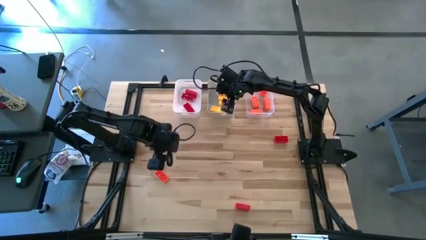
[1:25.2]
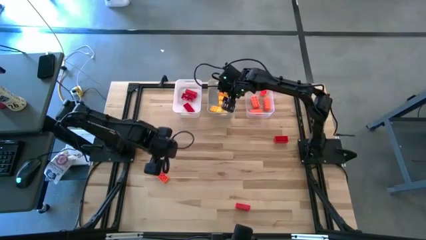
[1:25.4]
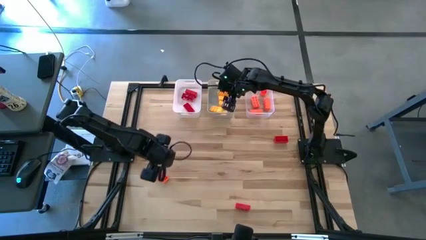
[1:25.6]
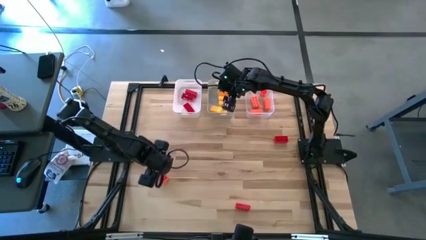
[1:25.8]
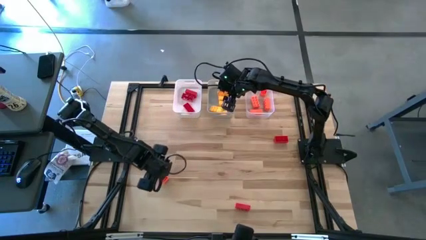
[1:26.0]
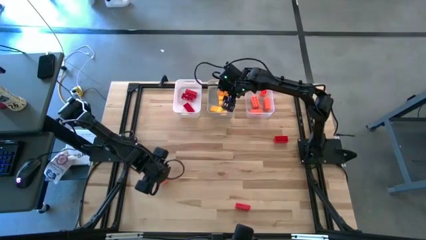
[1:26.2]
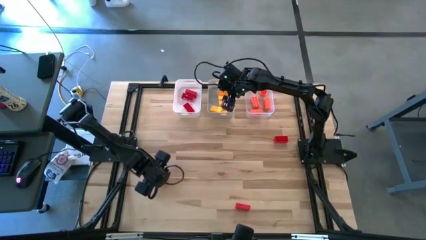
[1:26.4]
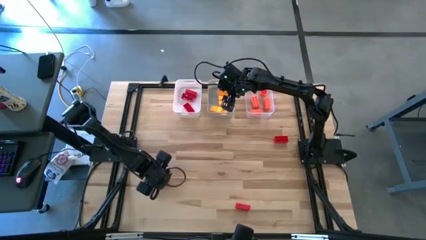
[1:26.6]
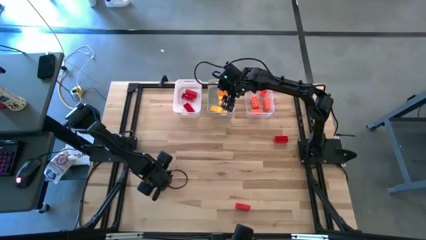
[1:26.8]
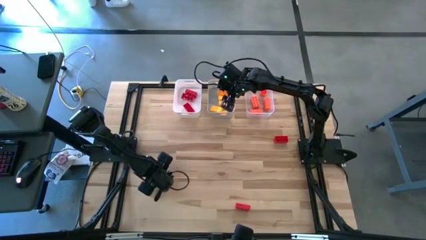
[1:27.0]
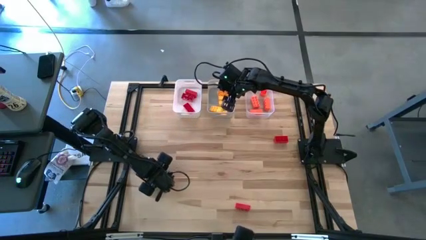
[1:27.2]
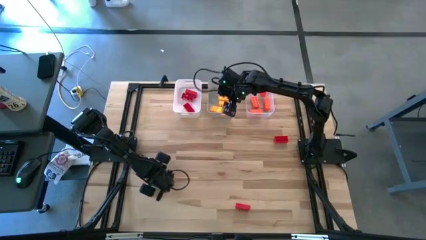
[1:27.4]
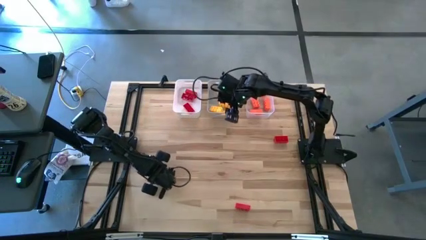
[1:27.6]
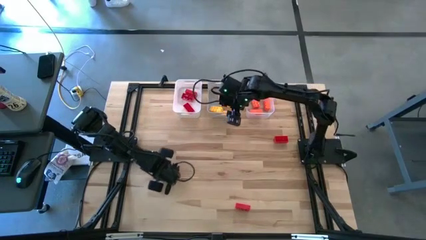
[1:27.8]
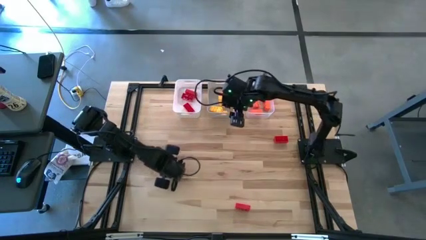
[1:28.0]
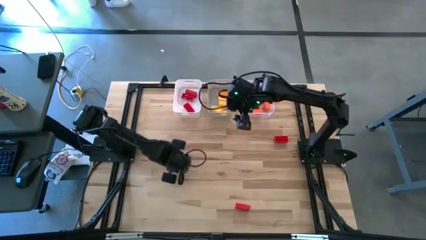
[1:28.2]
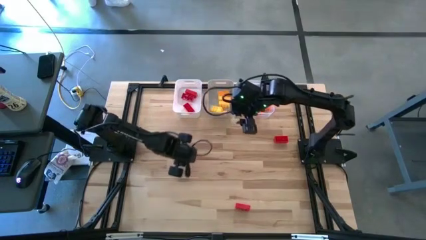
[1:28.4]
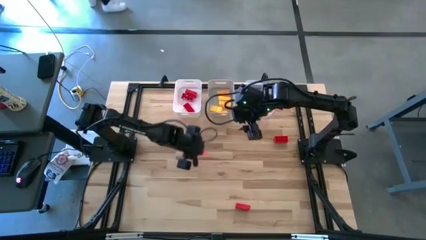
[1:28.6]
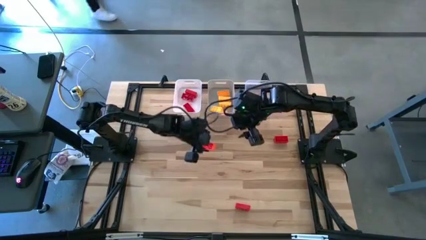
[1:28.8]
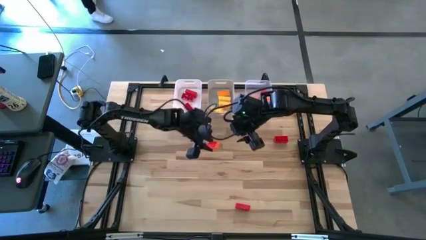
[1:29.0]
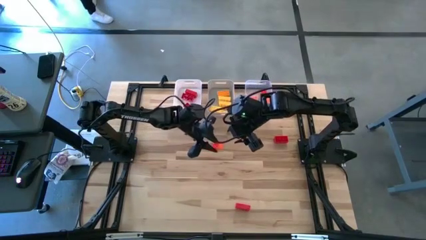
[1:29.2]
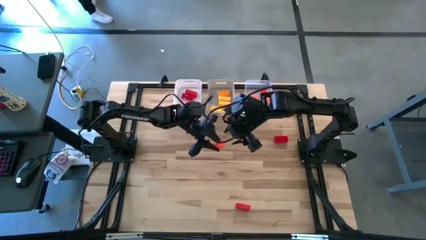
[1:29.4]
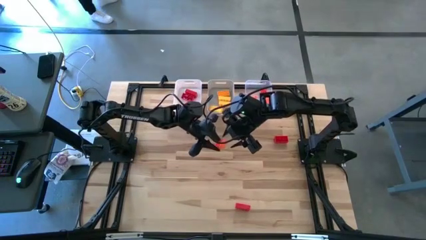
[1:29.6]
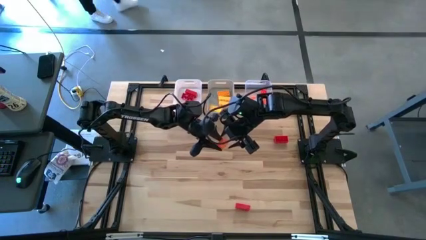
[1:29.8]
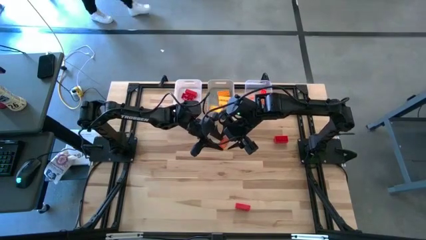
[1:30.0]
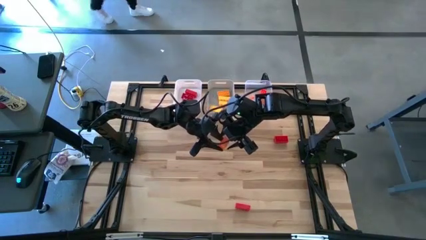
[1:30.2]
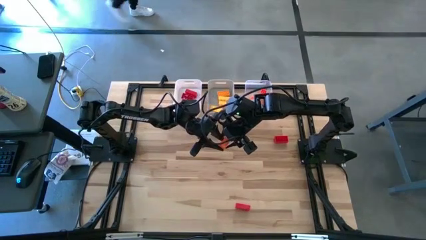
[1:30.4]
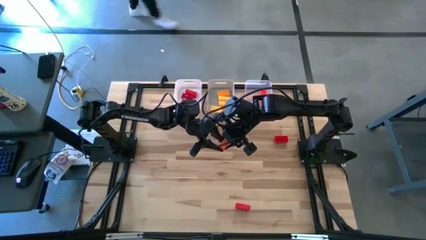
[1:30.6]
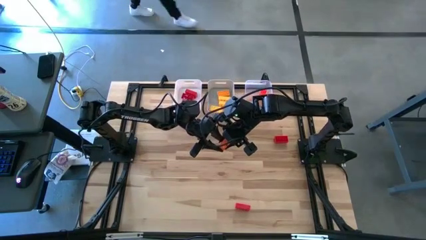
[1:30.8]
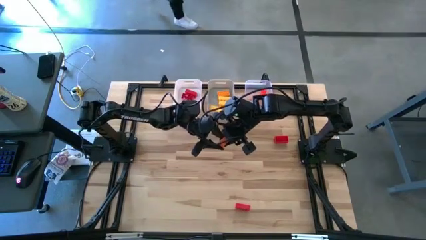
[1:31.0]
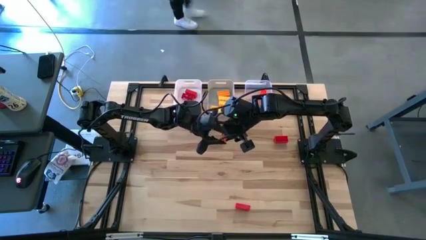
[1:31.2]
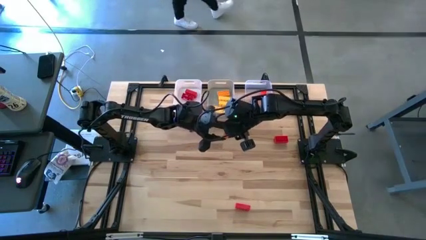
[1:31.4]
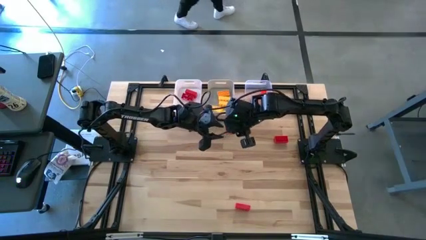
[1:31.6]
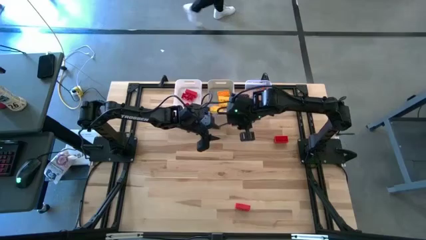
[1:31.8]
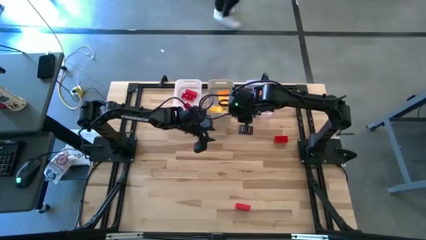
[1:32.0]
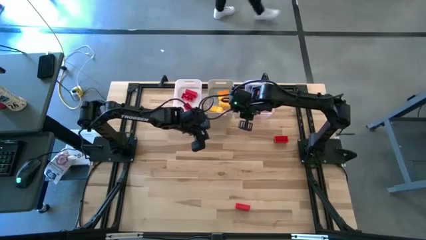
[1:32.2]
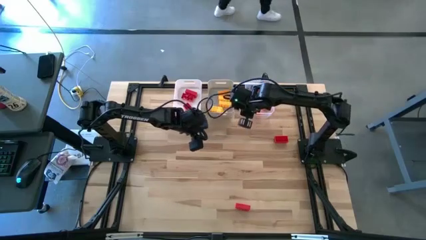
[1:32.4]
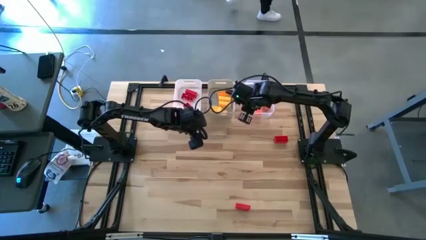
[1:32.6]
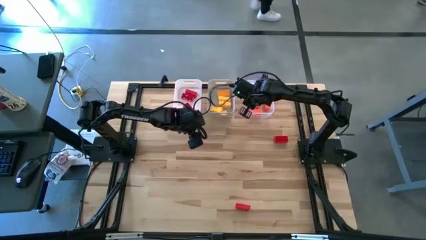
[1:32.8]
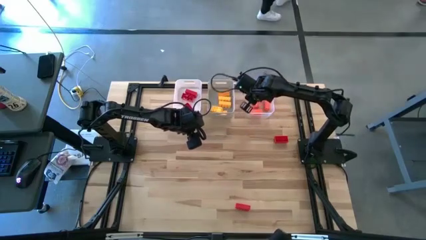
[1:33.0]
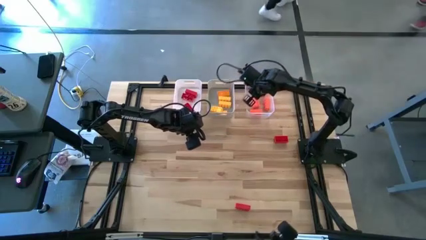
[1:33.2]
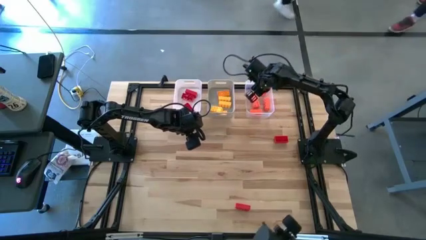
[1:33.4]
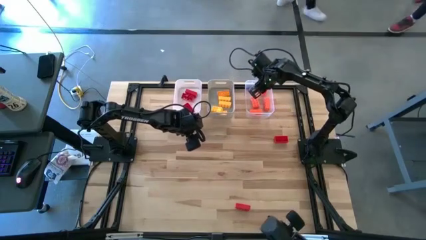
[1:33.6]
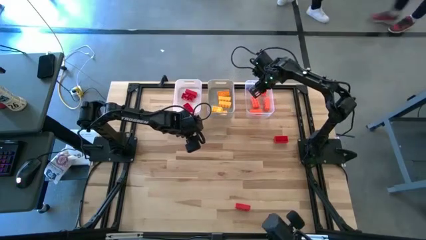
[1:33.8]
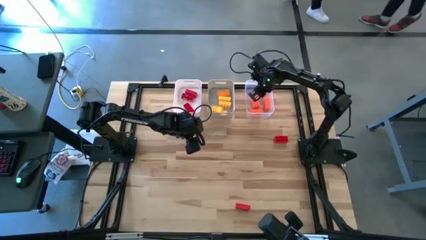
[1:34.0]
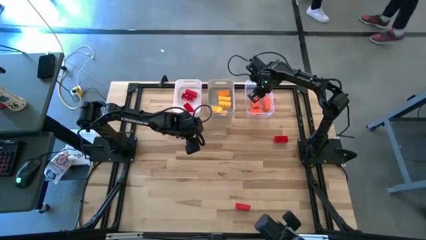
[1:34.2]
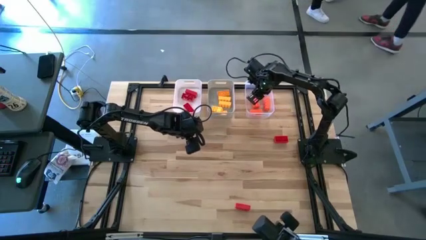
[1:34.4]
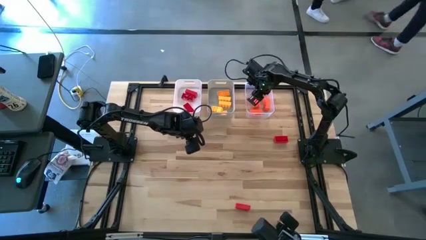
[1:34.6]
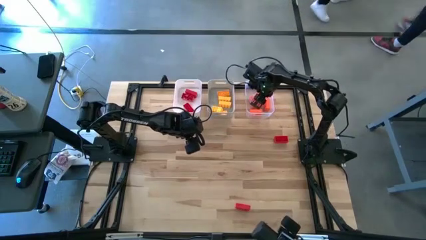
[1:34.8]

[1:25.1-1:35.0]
Task: Sort & place blocks by color
Put the orange game piece into the transparent bin

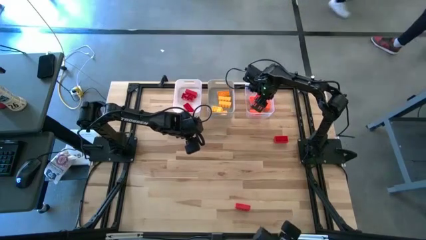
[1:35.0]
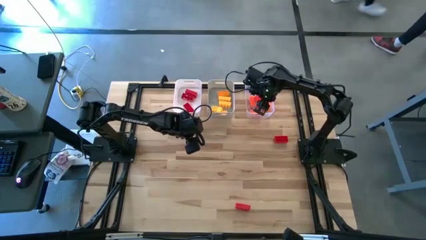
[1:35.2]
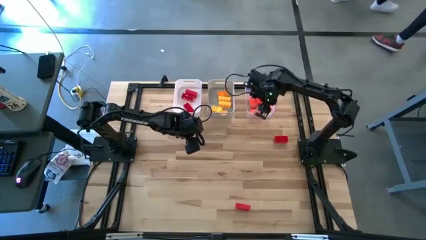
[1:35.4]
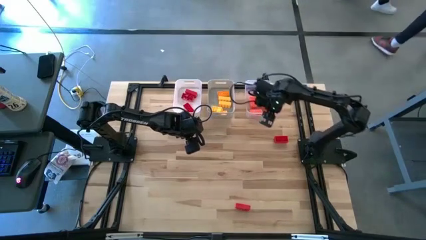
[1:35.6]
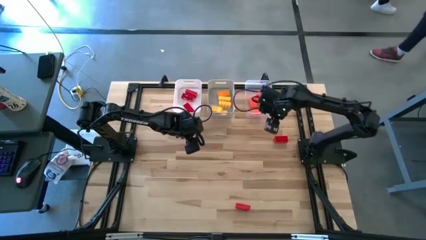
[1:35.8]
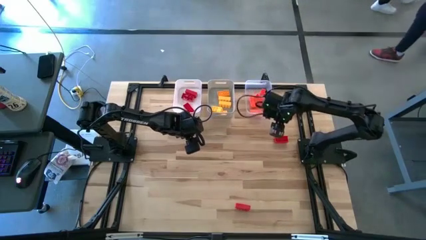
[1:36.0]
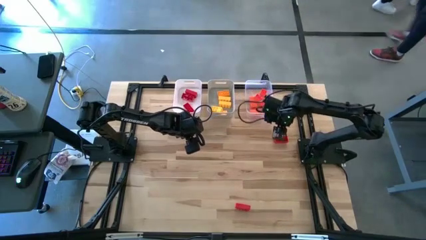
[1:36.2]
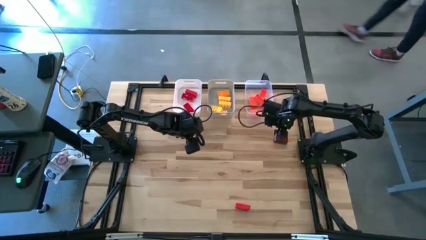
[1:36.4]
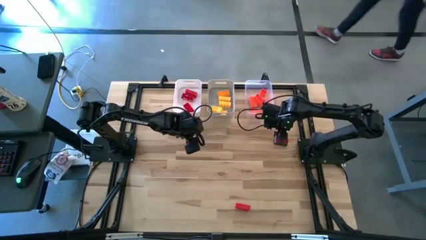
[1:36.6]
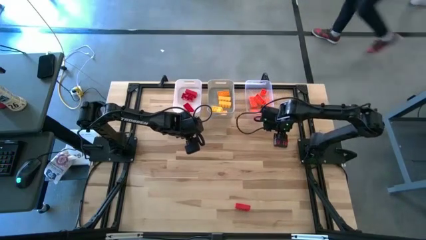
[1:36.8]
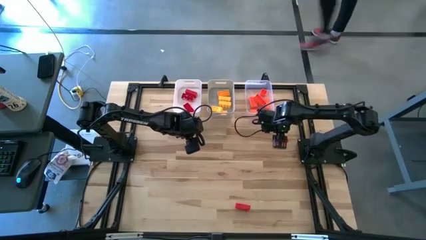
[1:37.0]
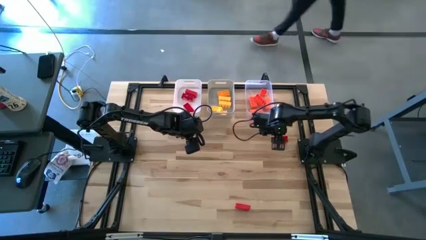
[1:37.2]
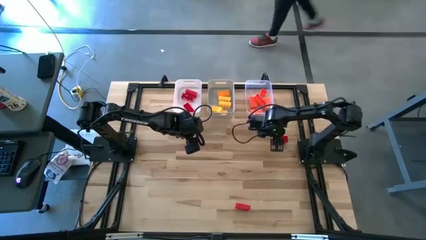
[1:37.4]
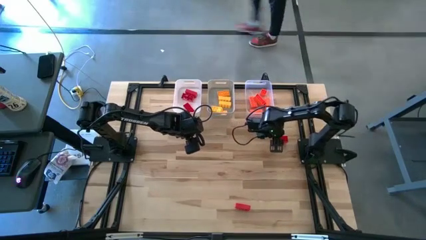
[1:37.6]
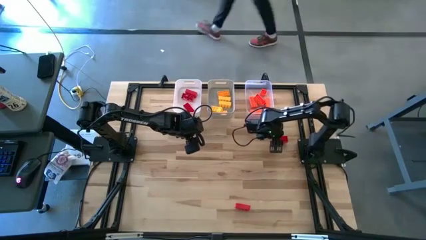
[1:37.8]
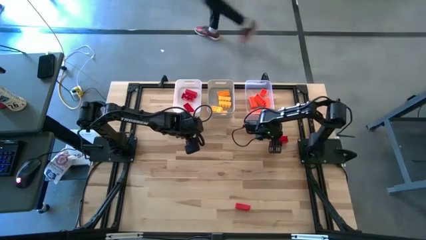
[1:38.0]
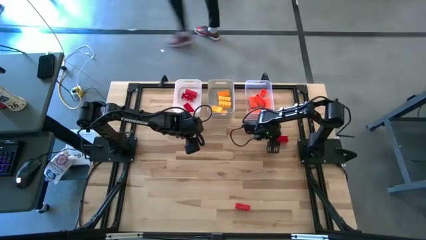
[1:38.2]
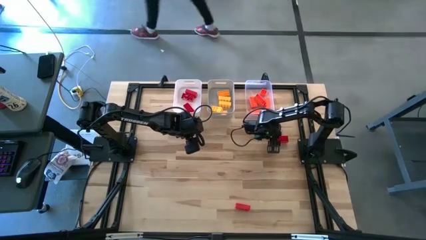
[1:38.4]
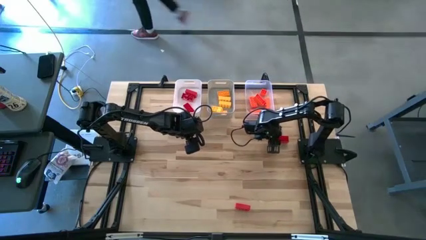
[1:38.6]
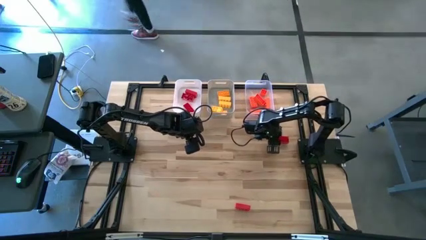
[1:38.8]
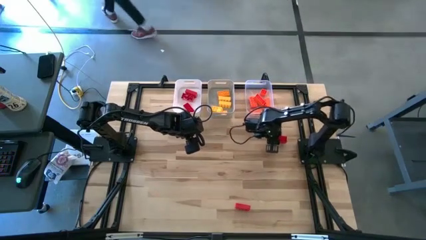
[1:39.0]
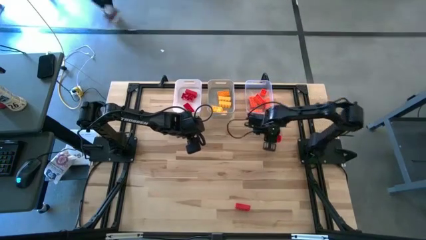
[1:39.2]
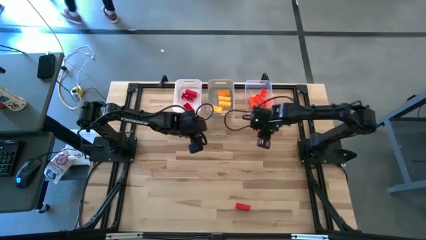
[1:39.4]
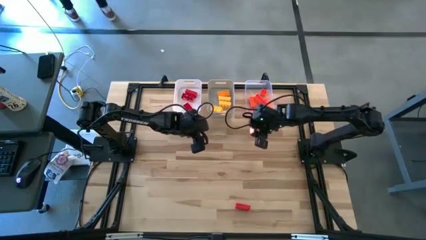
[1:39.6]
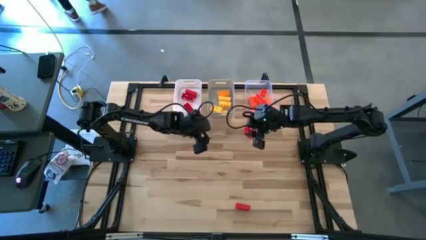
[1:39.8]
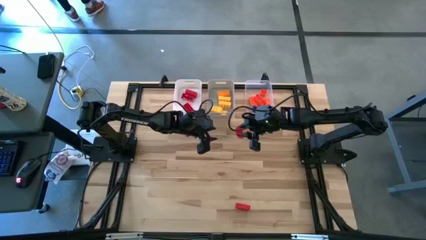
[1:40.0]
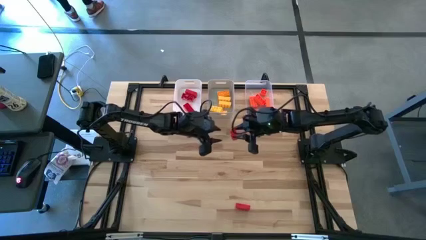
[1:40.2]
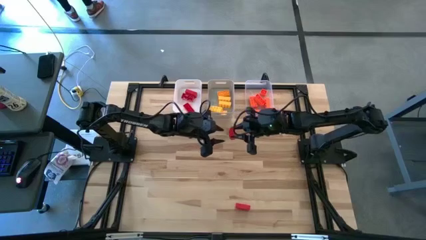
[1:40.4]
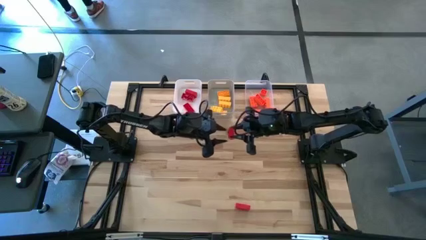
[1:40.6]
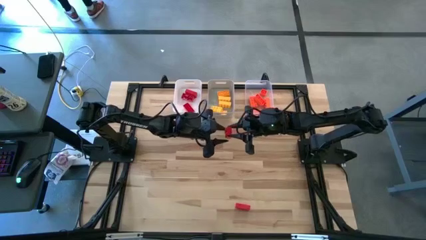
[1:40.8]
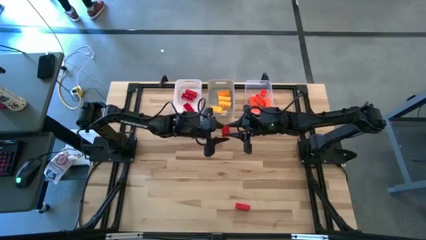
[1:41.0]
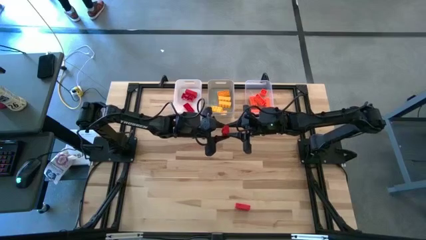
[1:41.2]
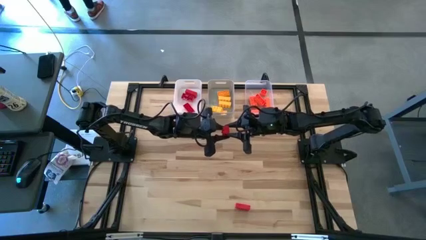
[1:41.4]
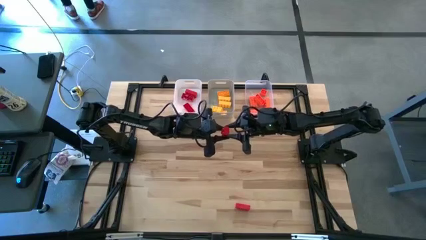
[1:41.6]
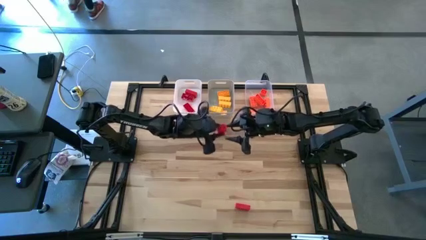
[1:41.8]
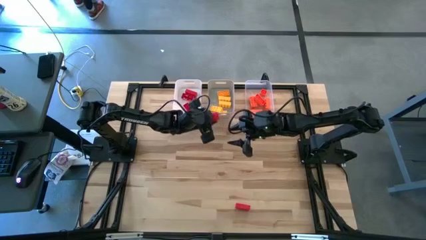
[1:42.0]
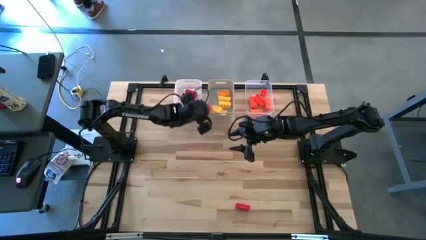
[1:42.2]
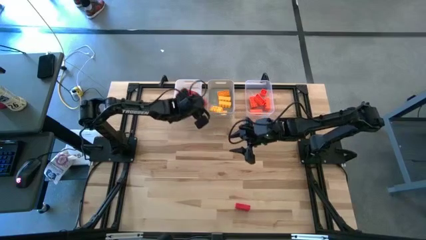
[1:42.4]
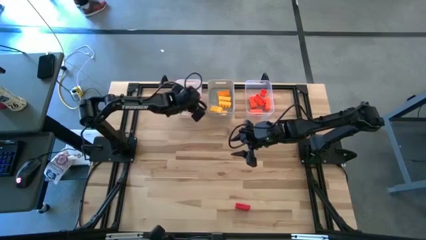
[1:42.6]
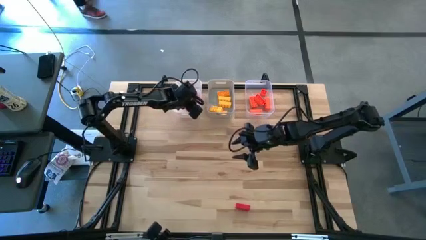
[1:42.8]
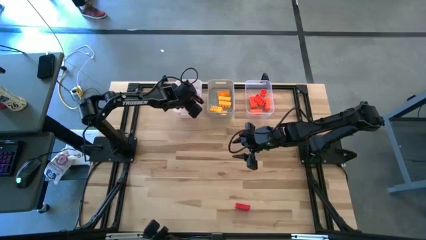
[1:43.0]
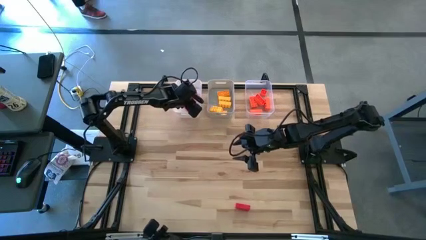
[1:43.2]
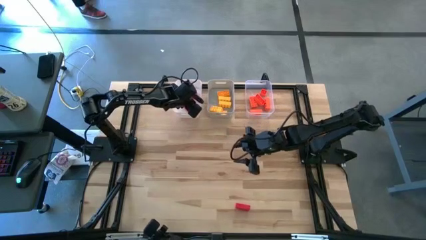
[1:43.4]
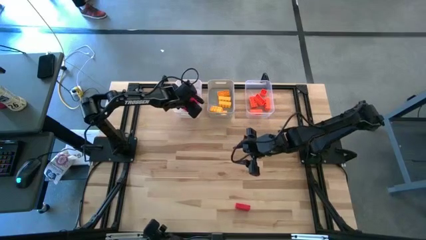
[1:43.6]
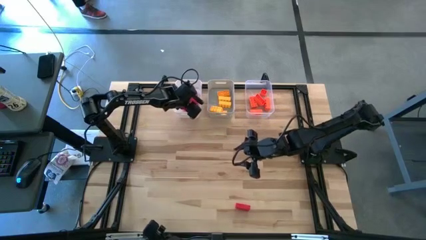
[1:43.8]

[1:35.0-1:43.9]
Put the red game piece into the white bin
